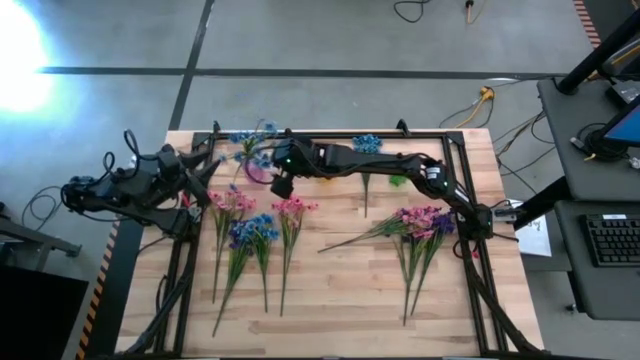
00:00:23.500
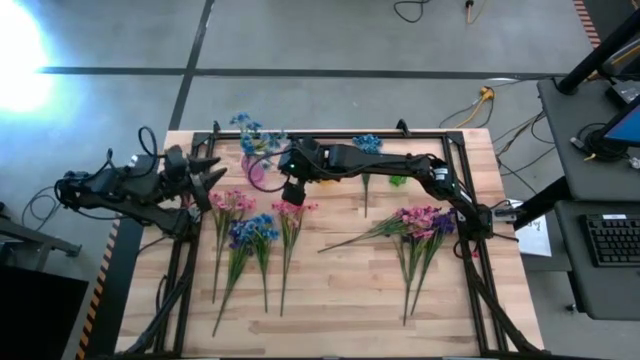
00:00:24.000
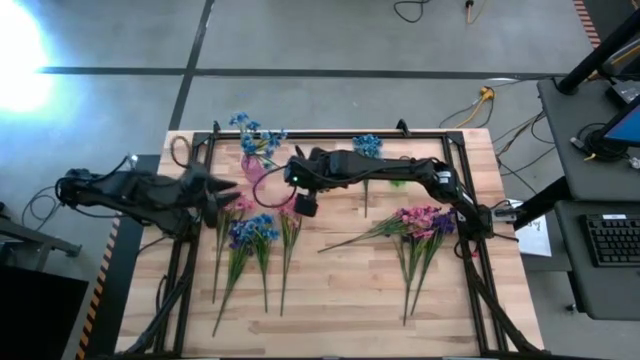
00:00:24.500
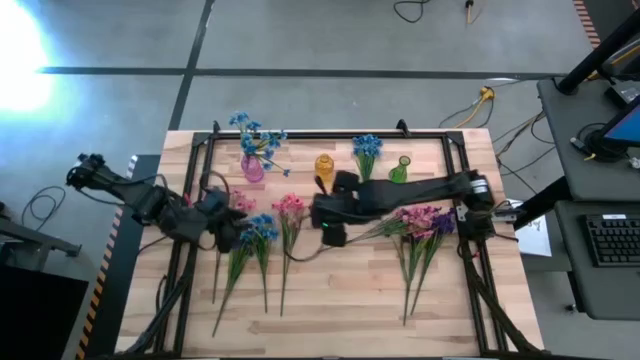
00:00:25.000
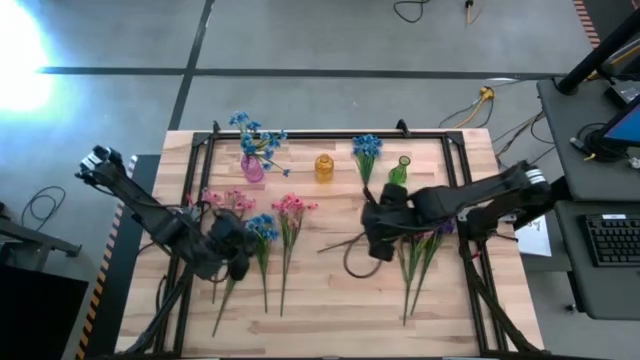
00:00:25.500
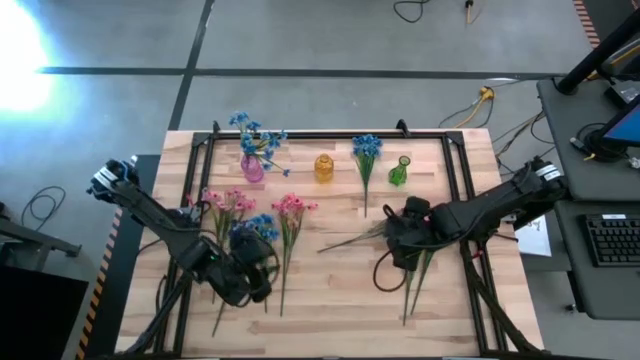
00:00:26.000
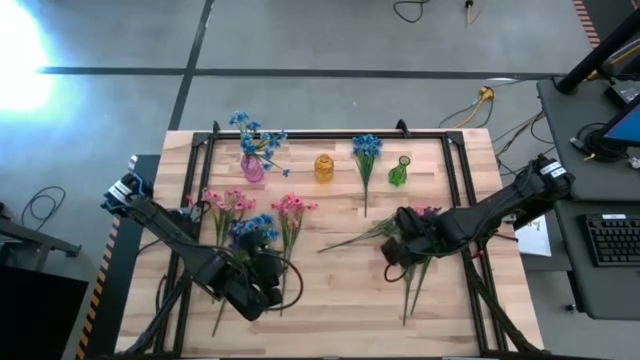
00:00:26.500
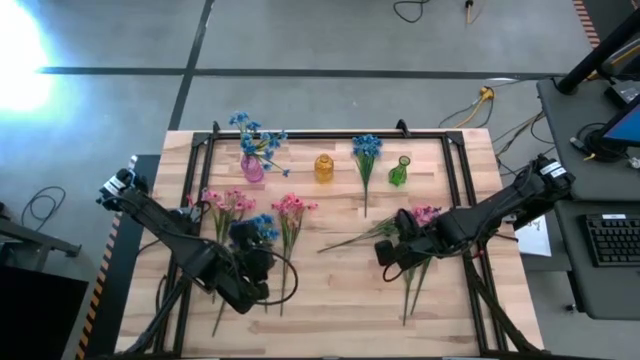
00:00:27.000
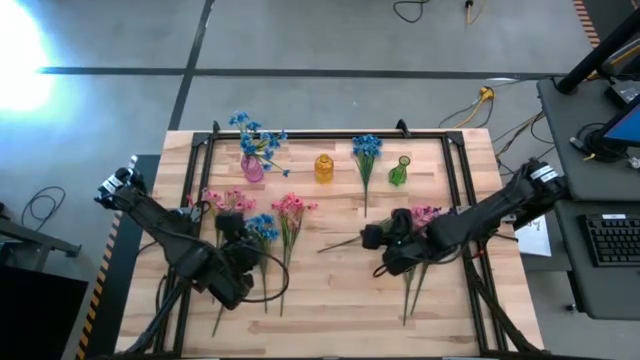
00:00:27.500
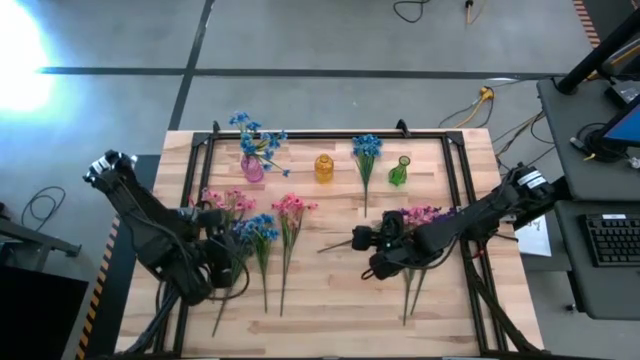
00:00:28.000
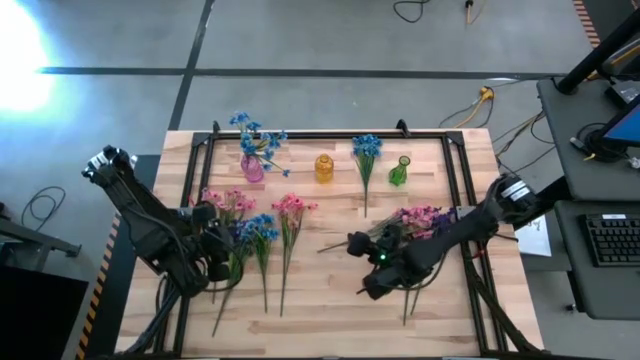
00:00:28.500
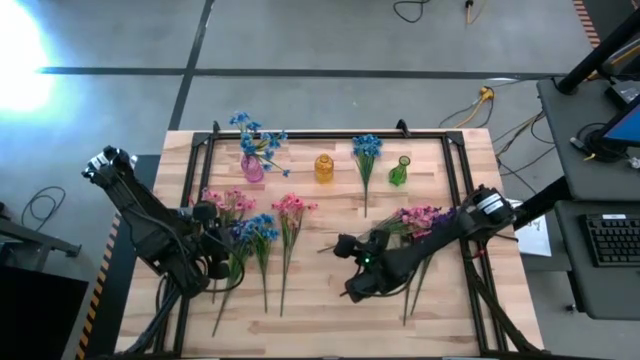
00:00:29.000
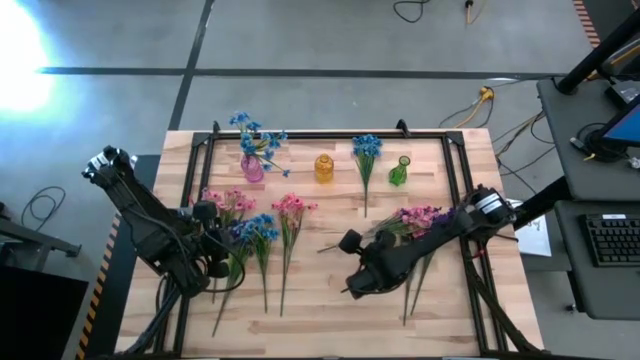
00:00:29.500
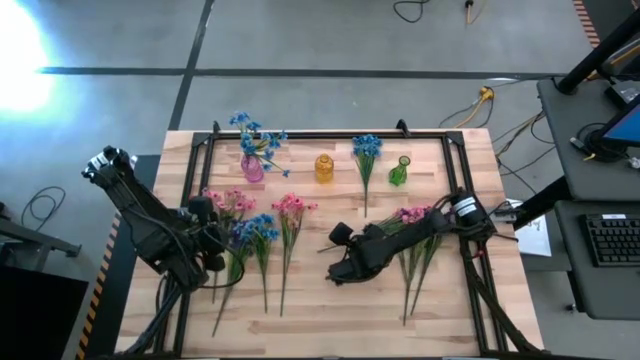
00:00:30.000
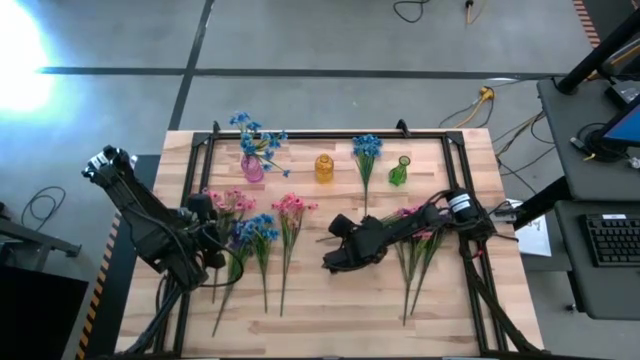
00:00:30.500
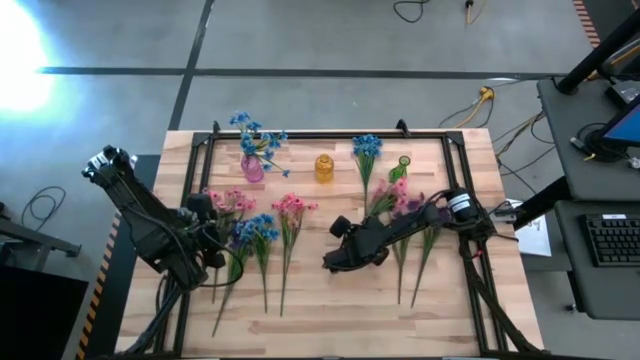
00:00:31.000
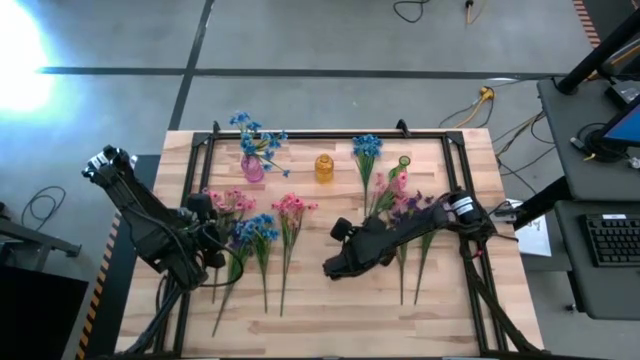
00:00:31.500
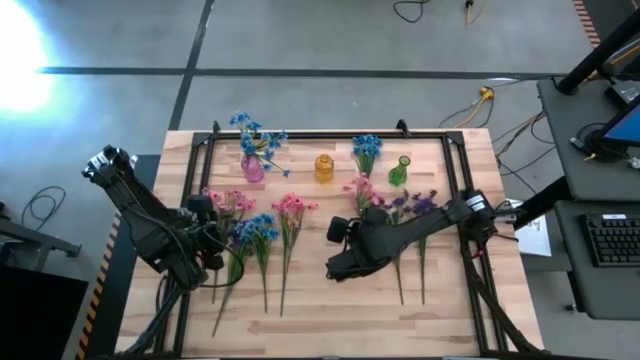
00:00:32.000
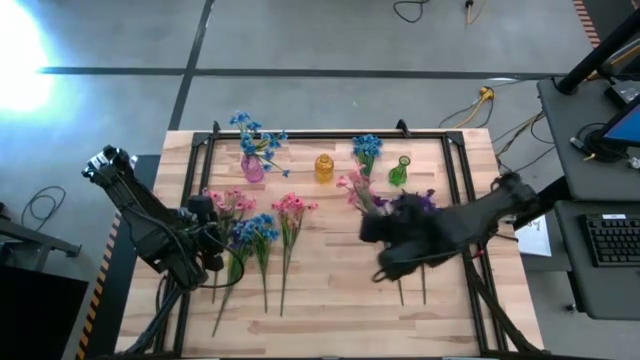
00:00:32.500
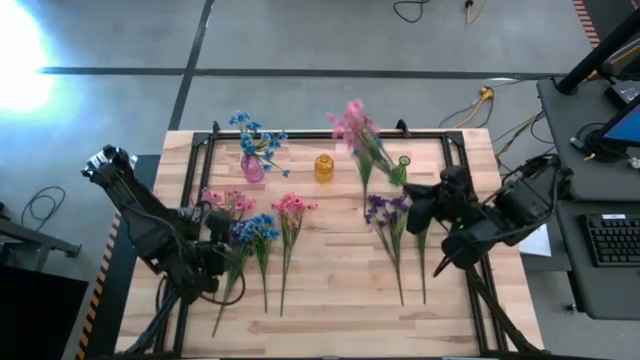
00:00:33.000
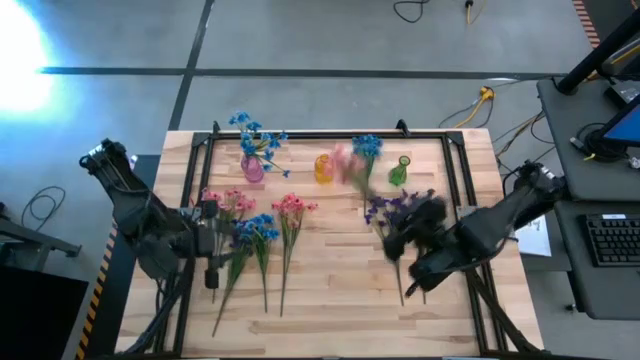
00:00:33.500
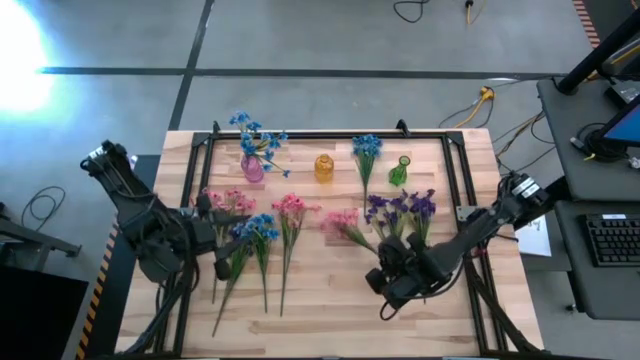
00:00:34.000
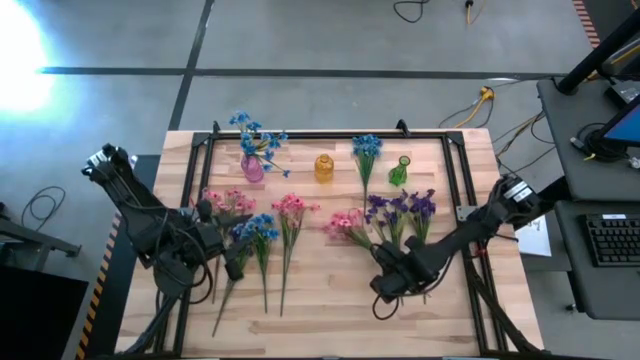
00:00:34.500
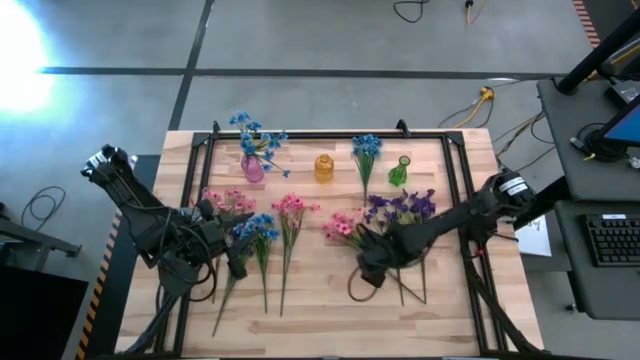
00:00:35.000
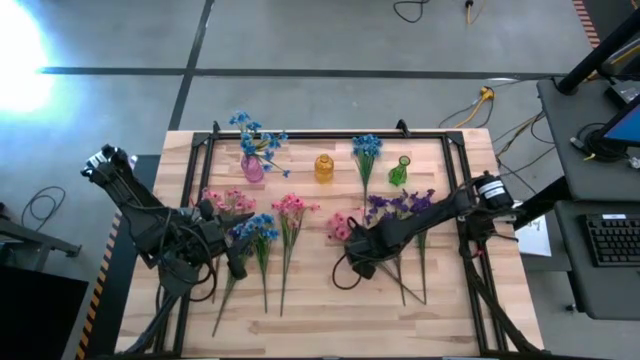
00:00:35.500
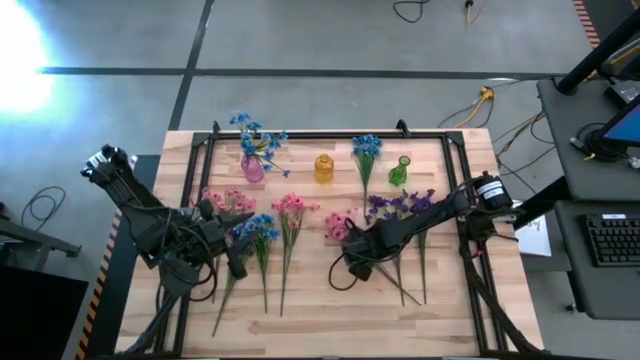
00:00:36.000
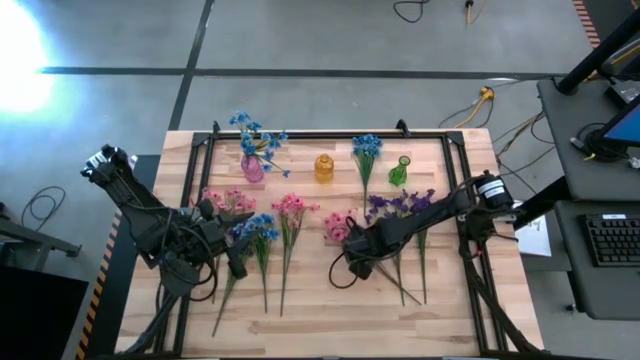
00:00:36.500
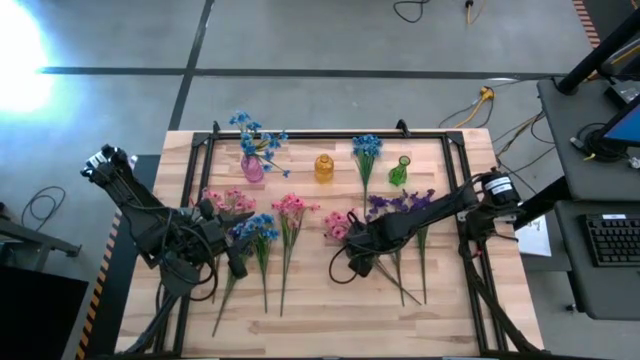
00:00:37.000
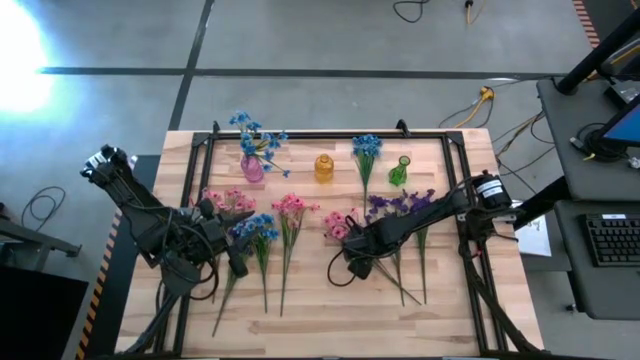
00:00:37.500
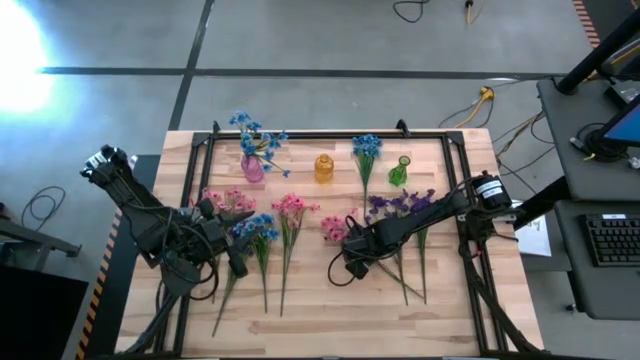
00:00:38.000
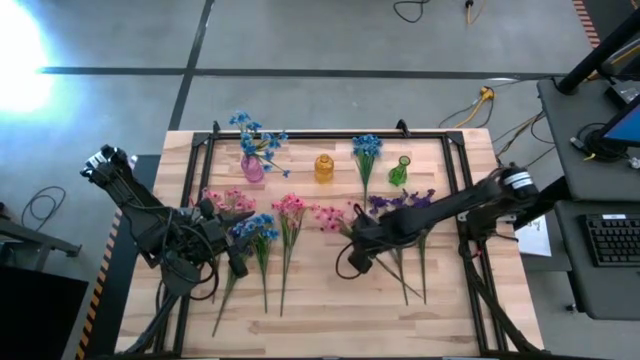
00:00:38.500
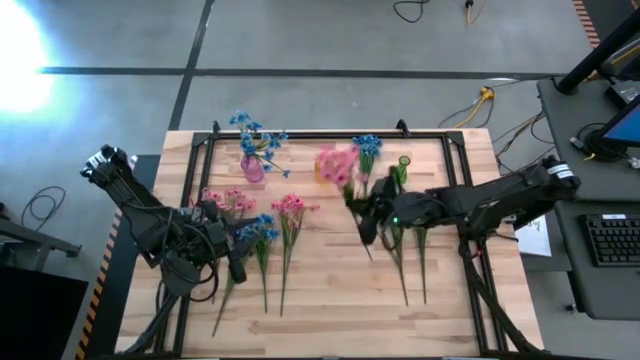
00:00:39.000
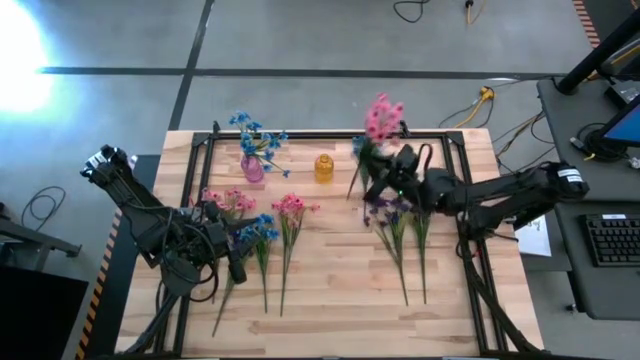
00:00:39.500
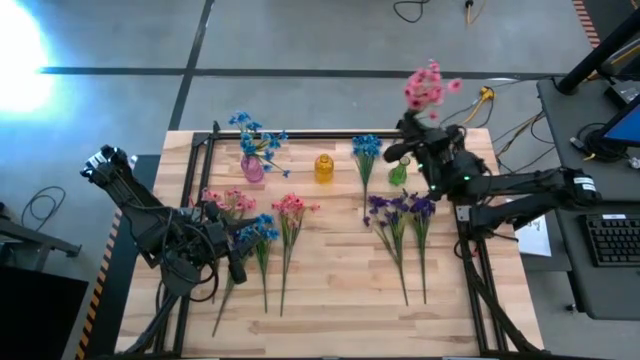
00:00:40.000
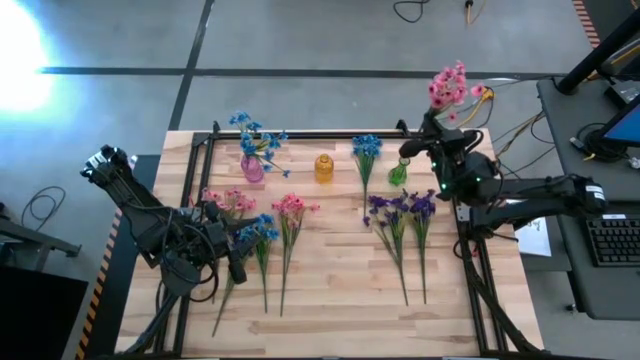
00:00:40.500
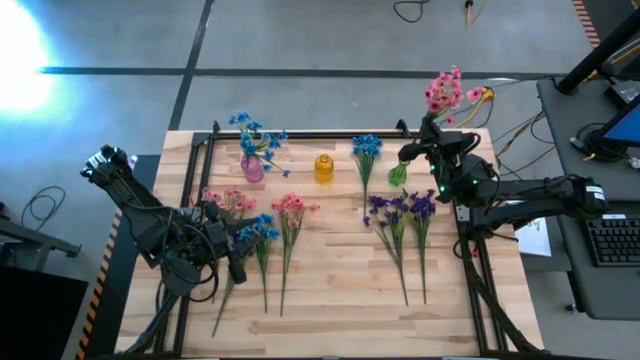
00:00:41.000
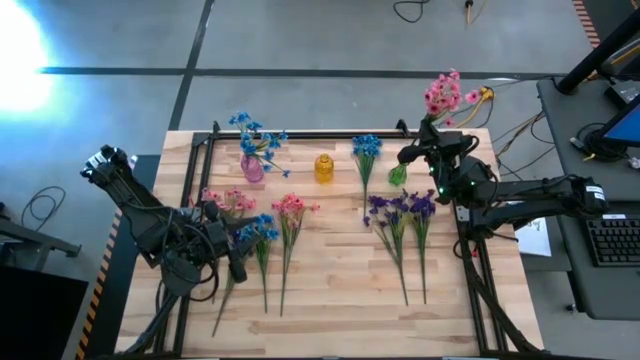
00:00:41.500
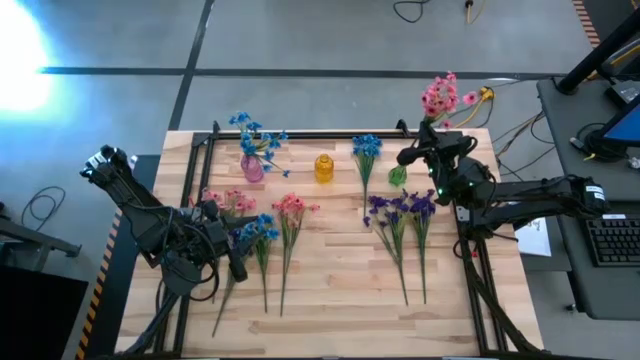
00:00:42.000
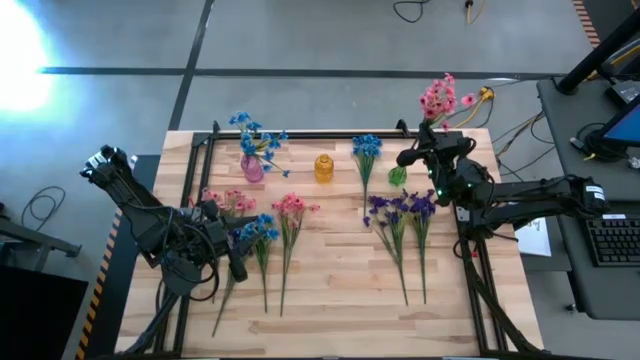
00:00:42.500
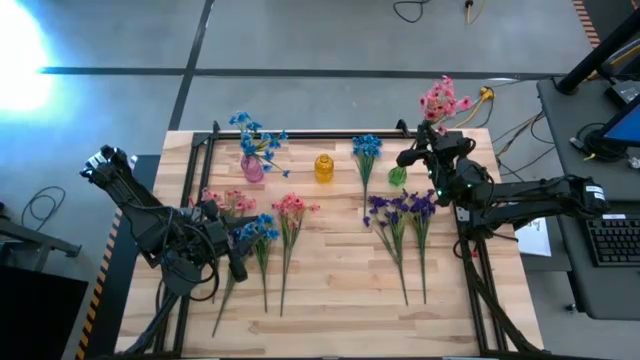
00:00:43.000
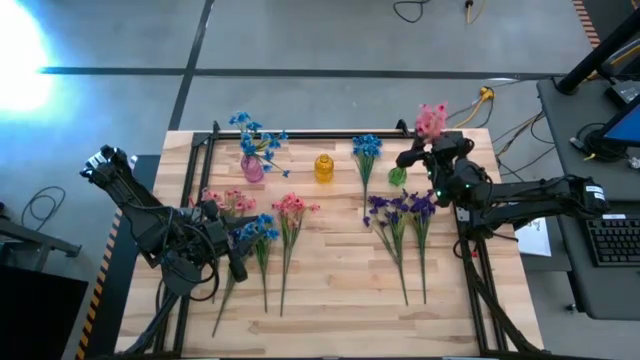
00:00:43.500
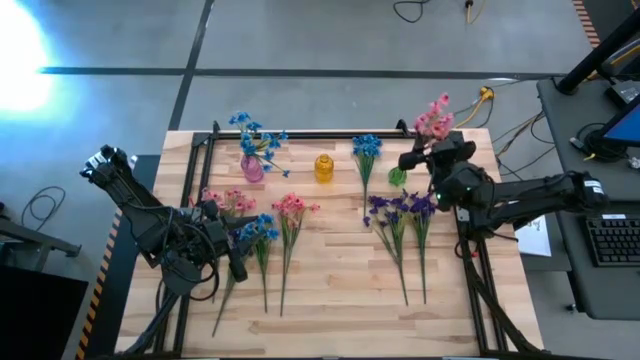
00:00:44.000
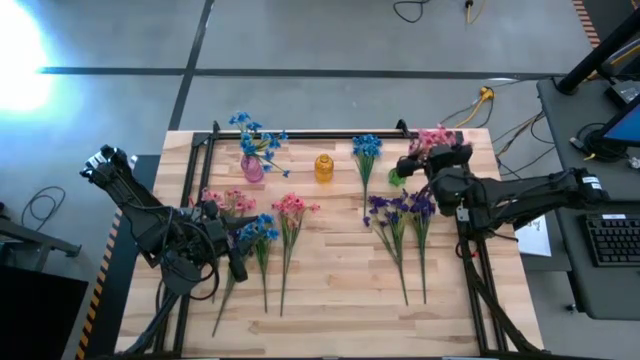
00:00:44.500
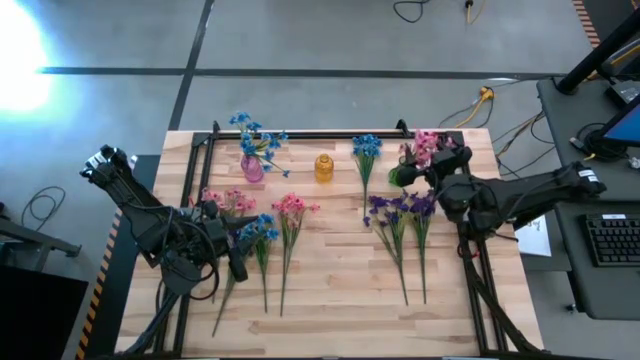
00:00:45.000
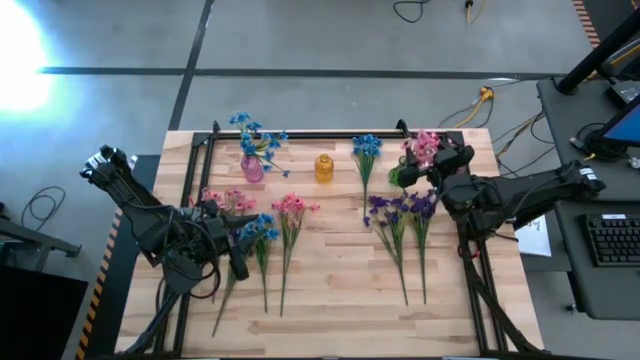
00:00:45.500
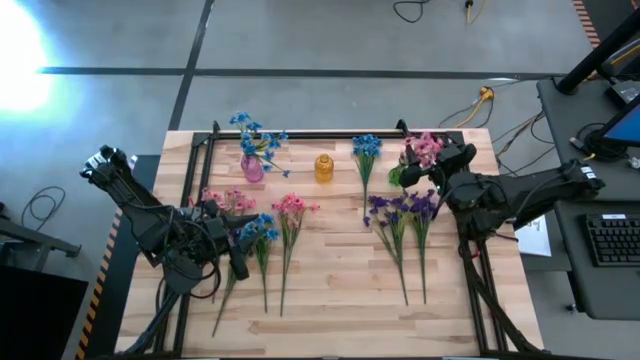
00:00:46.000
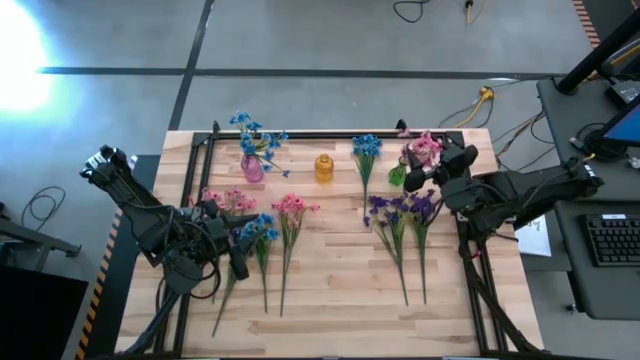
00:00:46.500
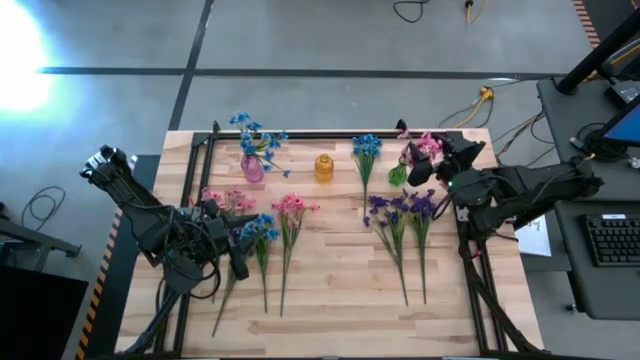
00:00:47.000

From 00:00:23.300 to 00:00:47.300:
Task: Sort flowers into vase by color
Put the right pink flowers into the green vase
